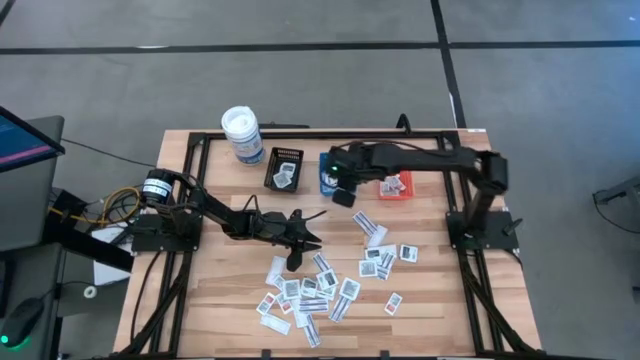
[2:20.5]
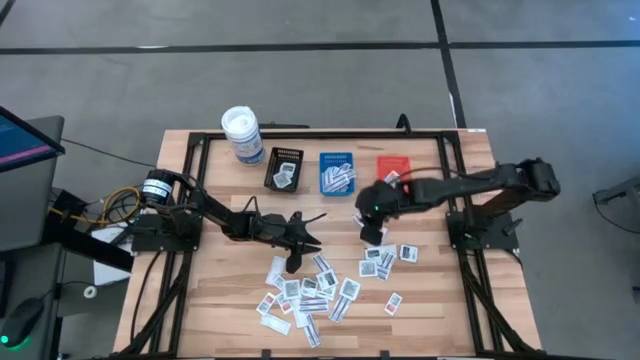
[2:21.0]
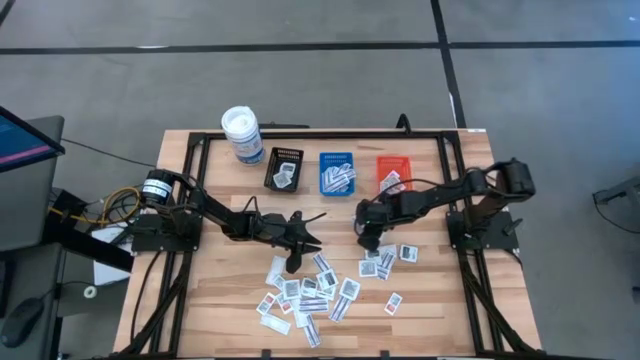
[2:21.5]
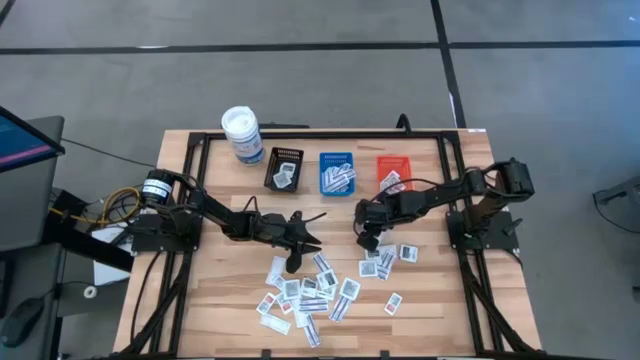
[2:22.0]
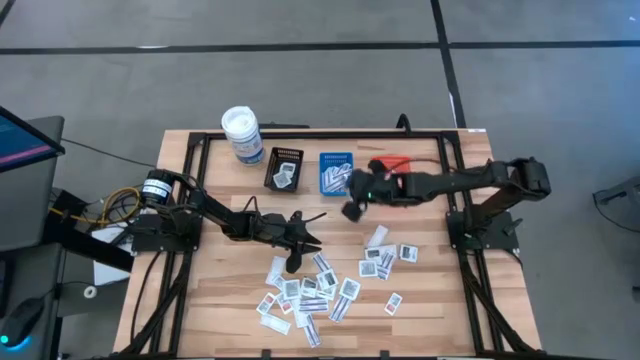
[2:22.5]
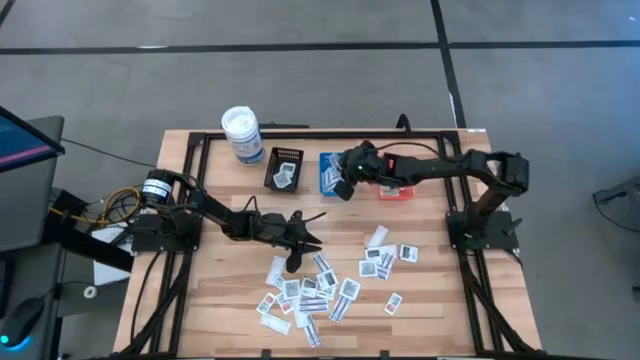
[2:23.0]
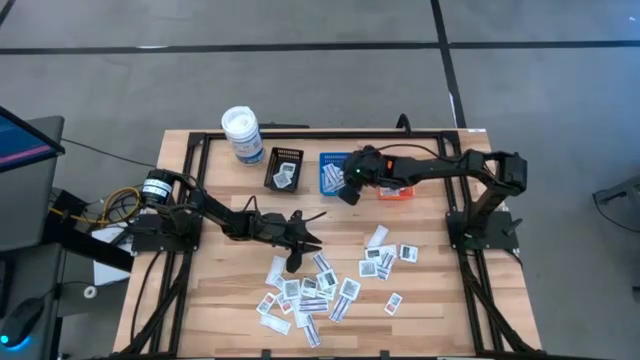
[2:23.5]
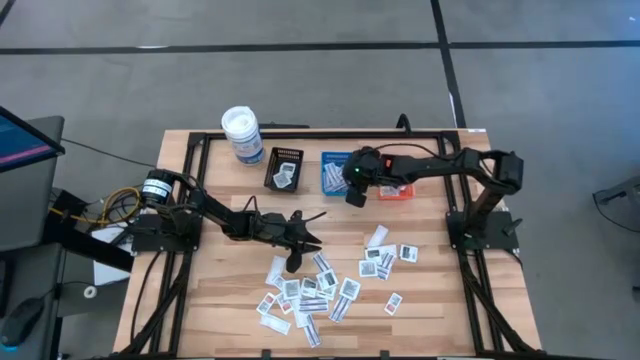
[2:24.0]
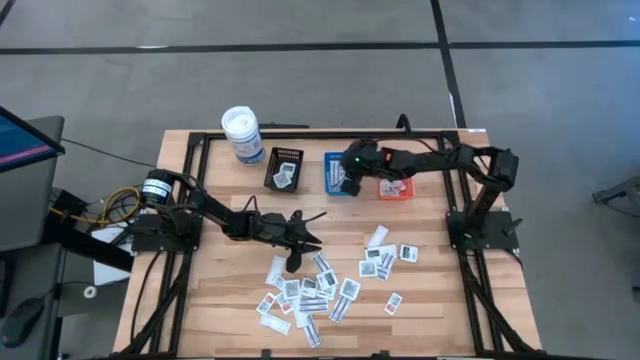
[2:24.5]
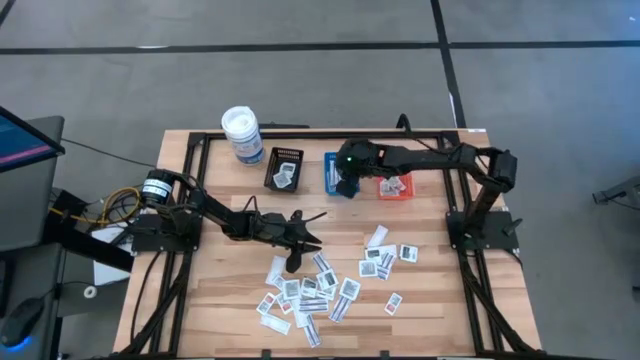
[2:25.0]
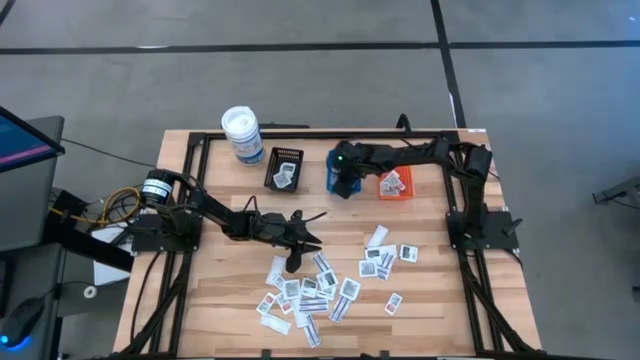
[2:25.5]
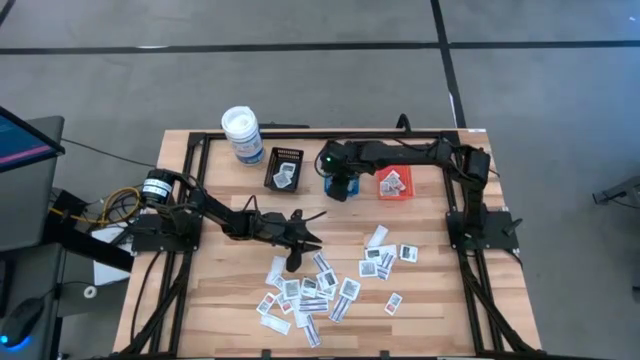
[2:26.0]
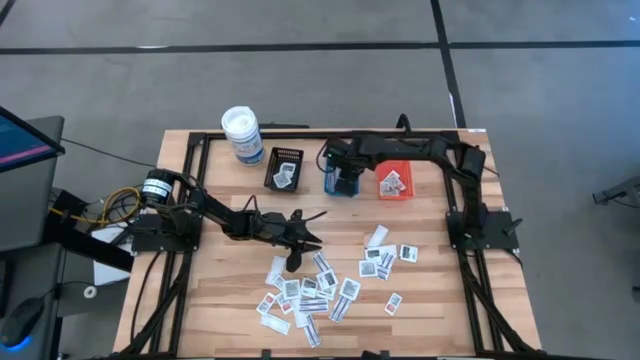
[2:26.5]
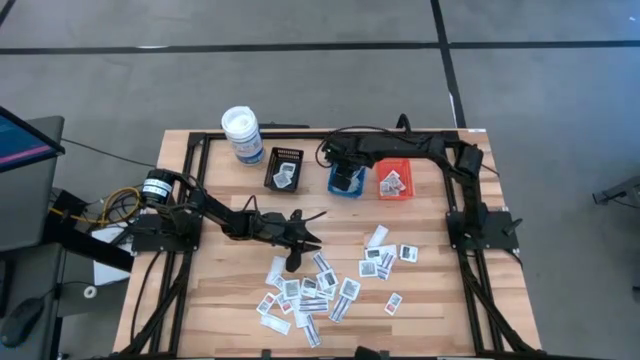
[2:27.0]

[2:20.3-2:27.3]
Task: Pick & Place First Aid Supplies
Put the blue bandage into the blue bin

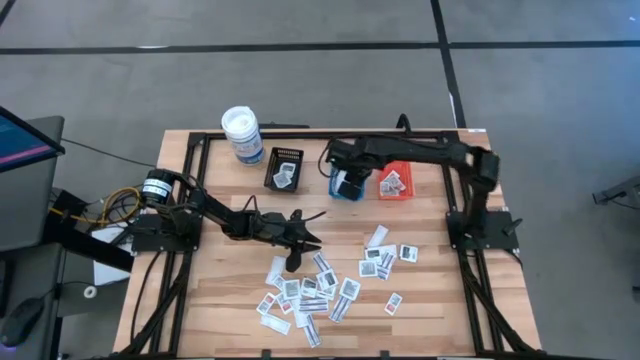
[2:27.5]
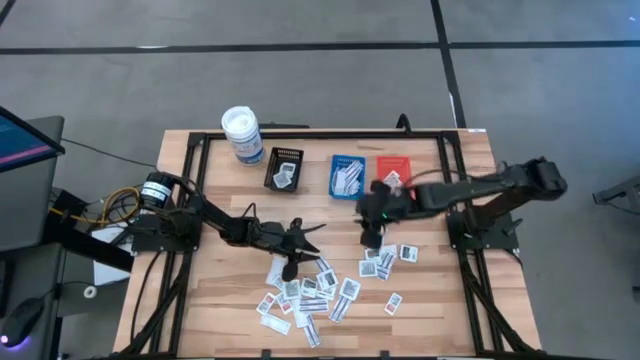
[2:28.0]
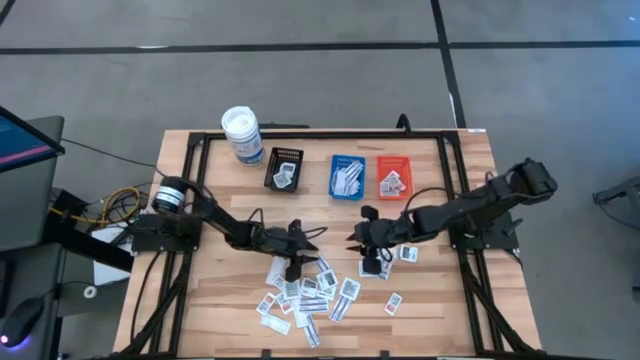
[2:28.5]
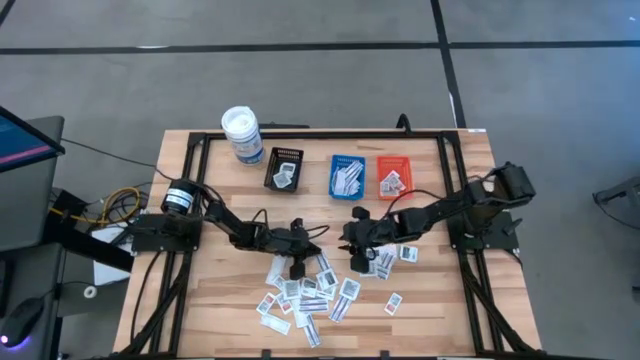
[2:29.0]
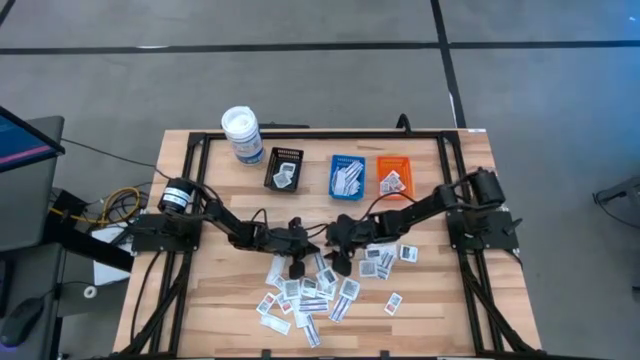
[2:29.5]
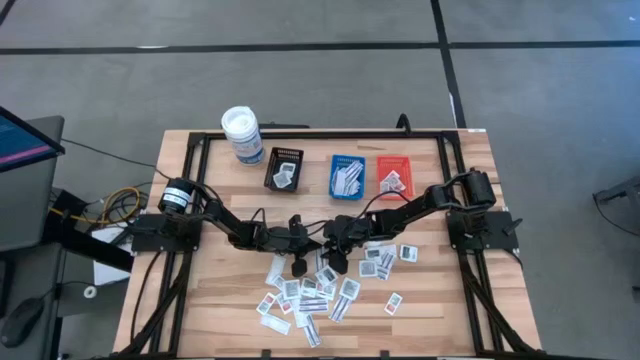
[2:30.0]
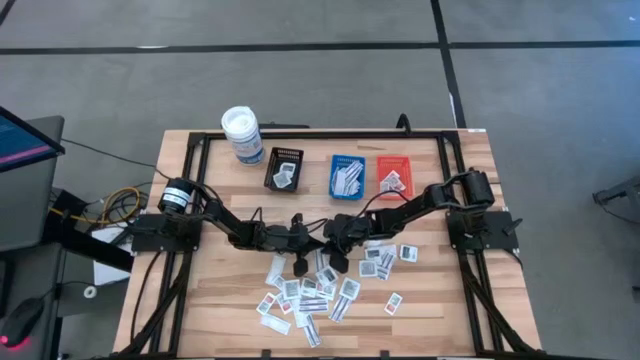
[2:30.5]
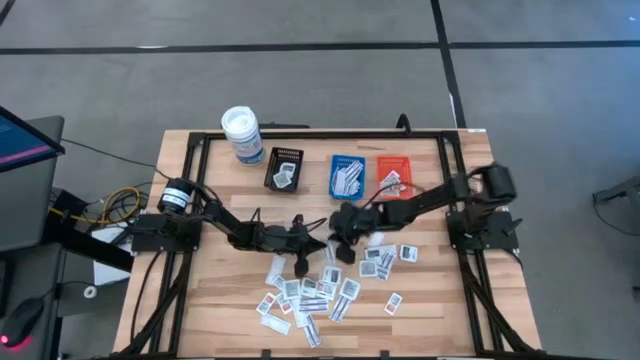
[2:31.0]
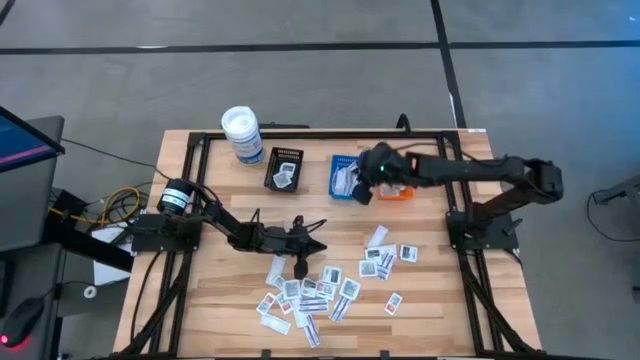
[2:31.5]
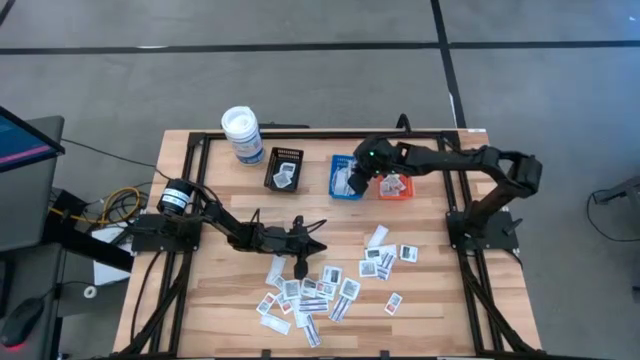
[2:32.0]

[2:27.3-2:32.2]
Put the blue bandage into the blue bin

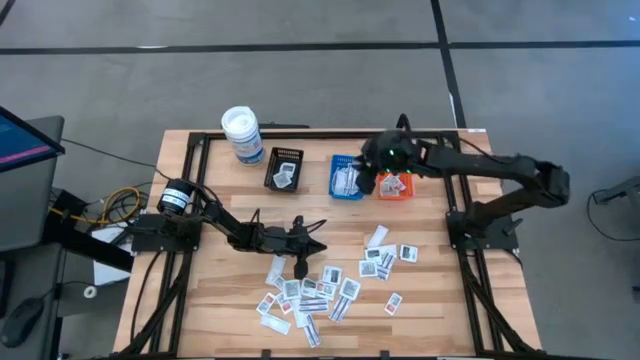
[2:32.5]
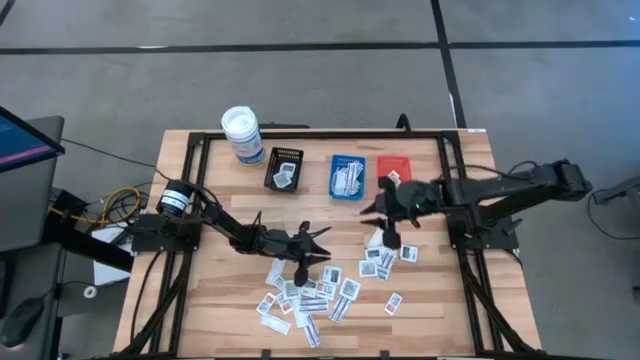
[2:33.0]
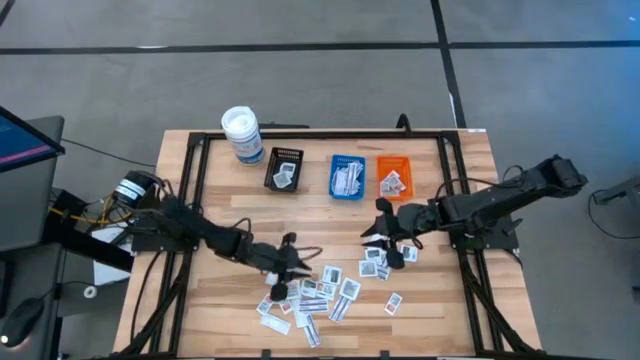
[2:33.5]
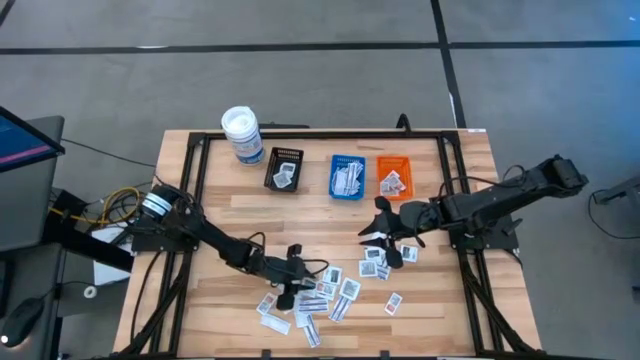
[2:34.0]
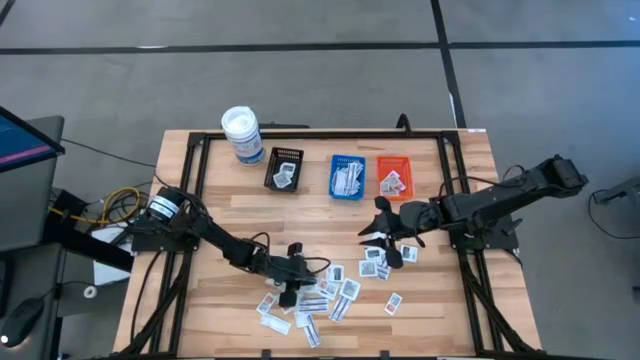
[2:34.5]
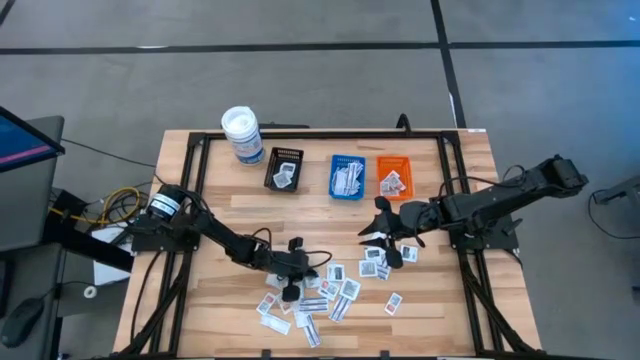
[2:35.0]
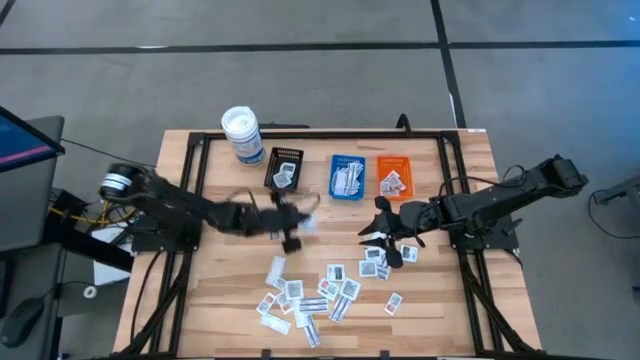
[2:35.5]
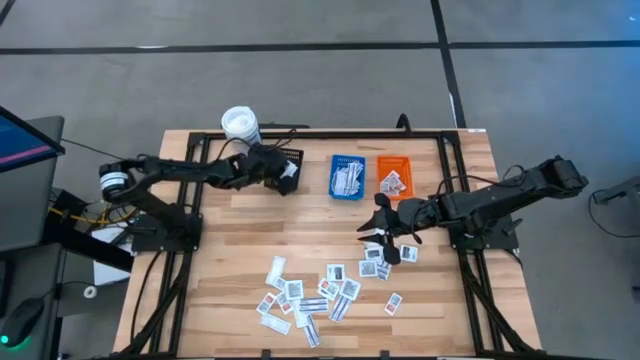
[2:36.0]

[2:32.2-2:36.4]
Put the black towelette pack into the black bin

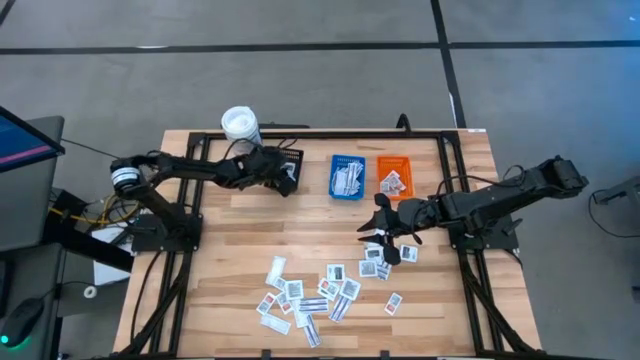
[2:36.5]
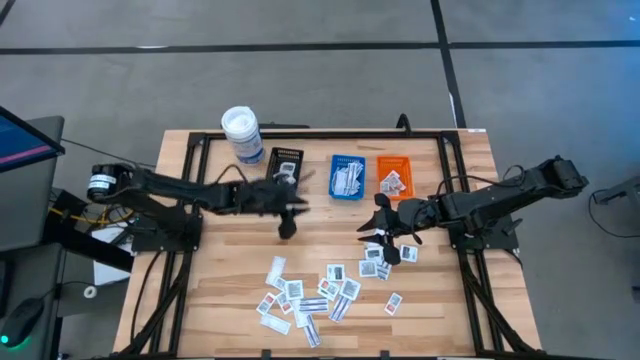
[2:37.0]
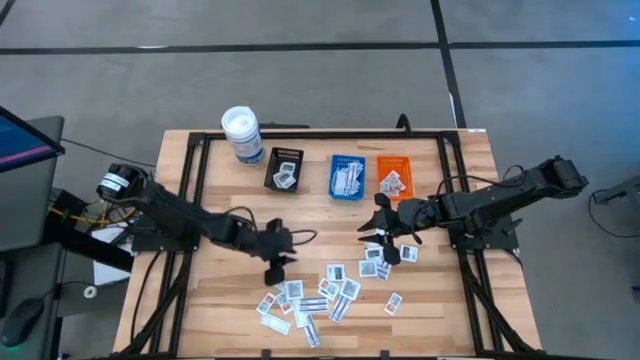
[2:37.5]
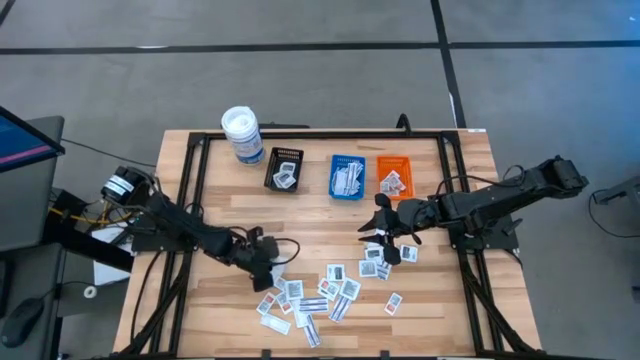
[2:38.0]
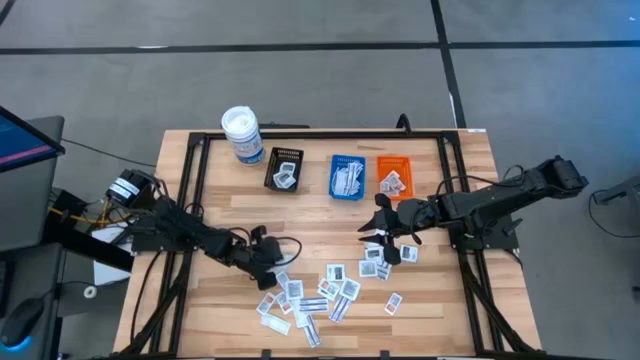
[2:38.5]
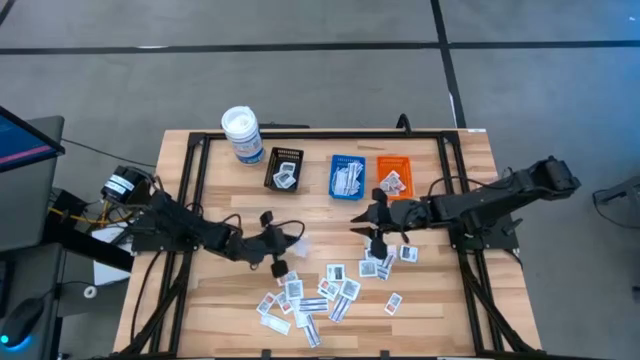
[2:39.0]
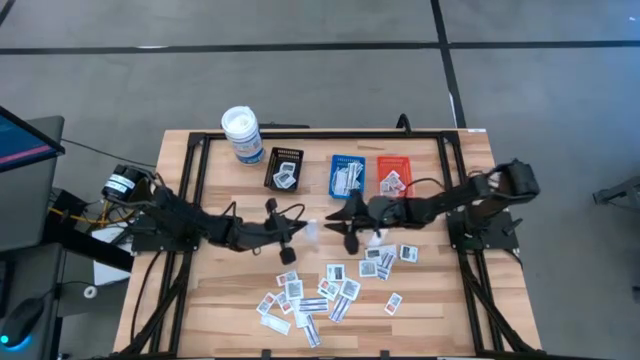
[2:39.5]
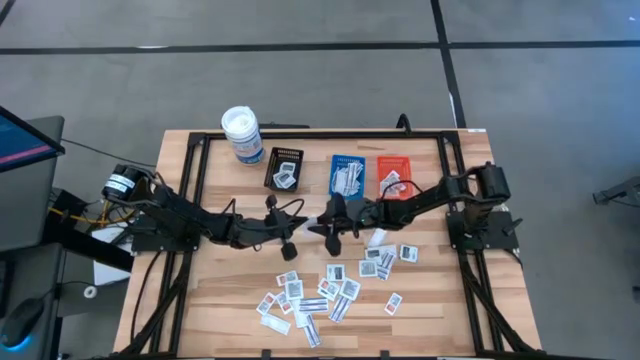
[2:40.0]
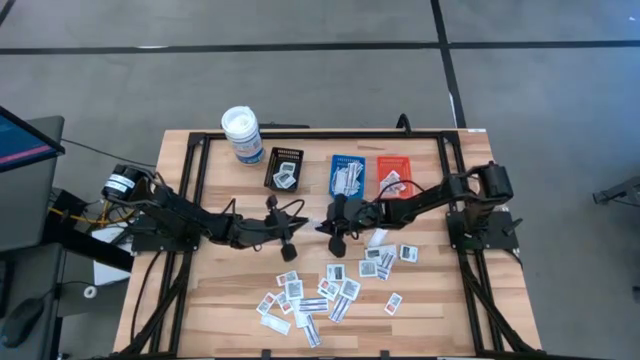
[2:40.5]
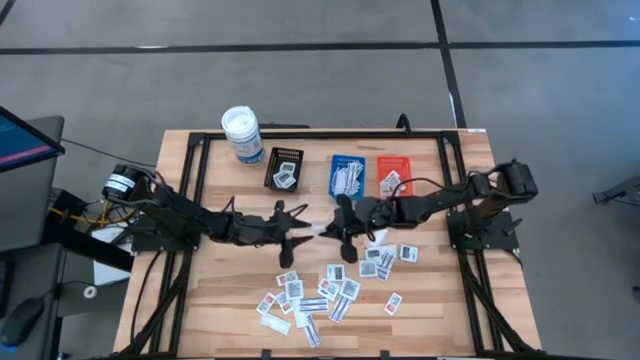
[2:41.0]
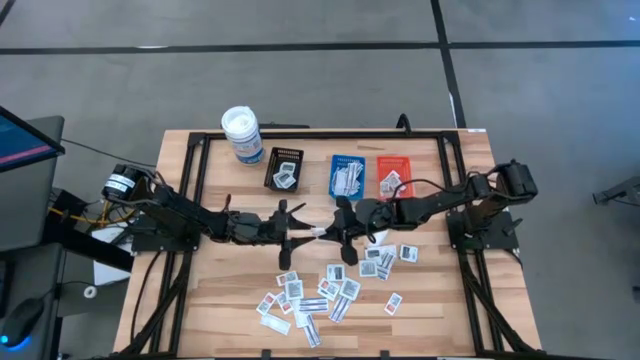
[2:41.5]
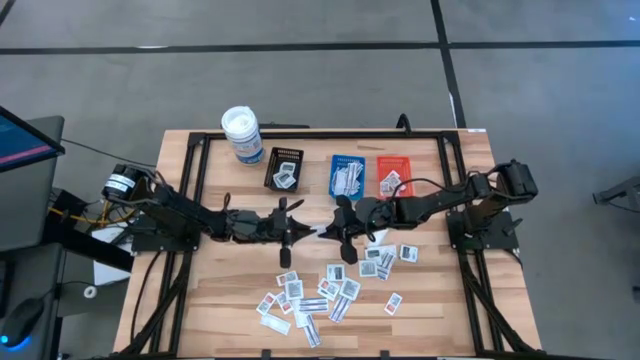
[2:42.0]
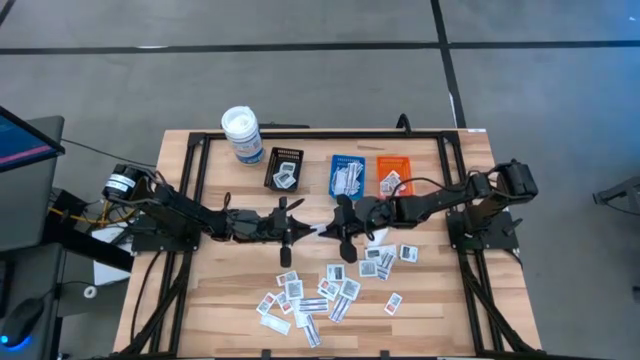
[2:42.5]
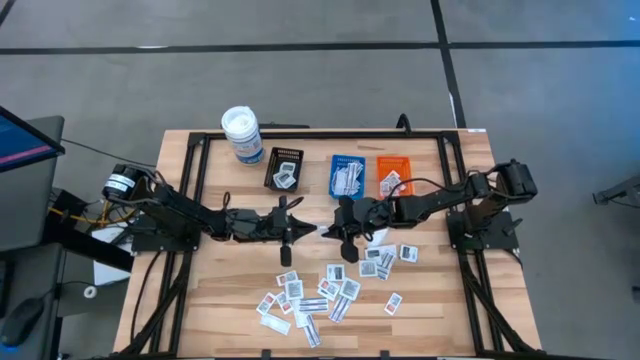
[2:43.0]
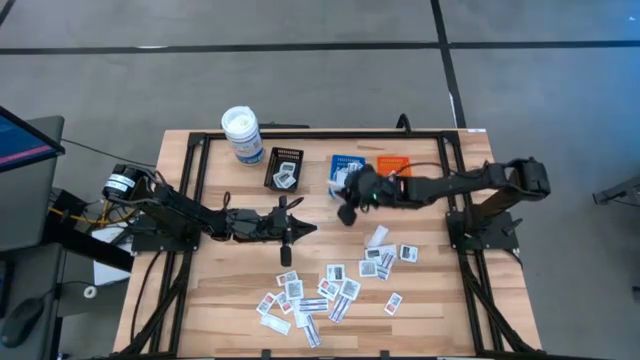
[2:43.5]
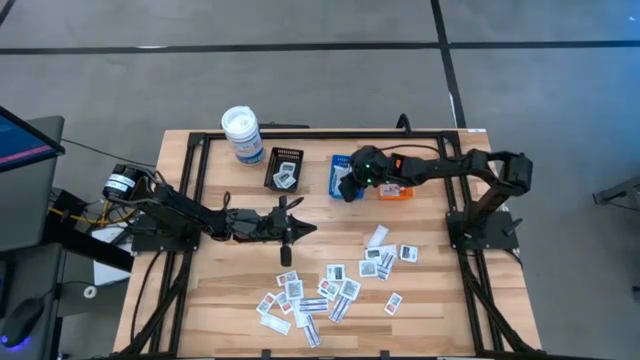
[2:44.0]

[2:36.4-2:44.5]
Put the blue bandage into the blue bin
